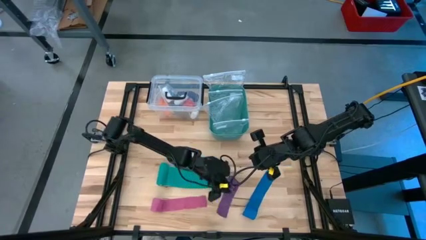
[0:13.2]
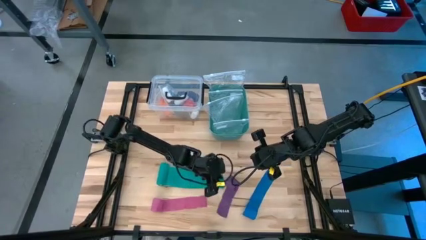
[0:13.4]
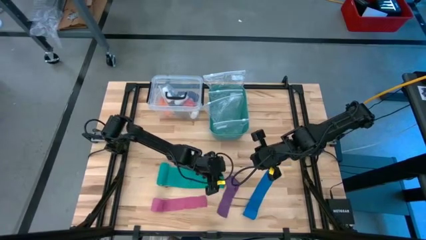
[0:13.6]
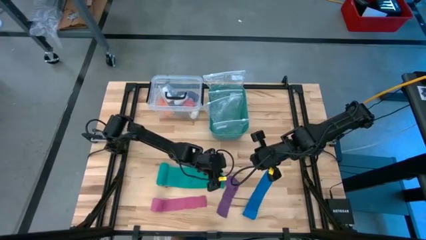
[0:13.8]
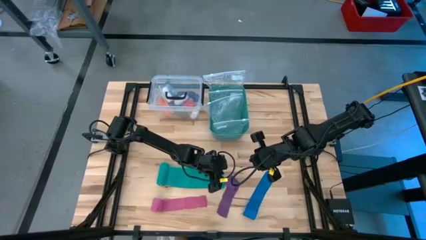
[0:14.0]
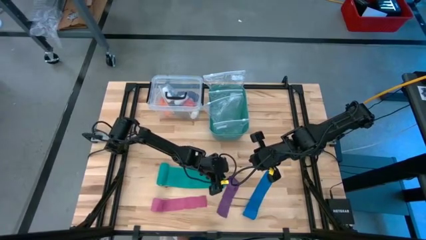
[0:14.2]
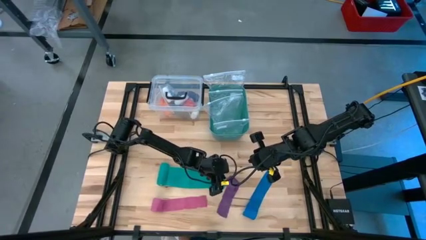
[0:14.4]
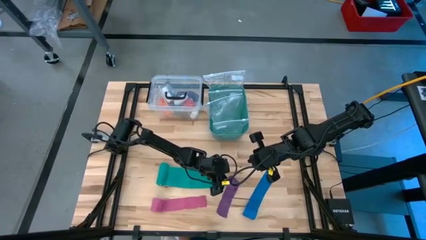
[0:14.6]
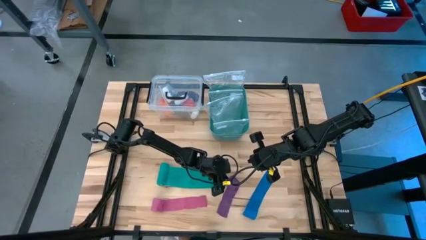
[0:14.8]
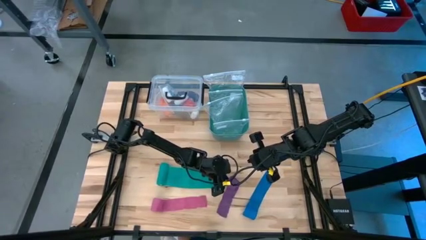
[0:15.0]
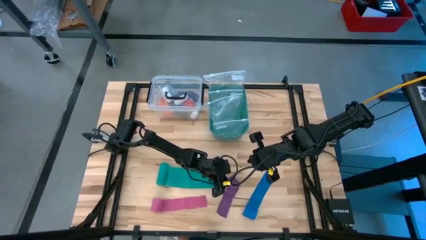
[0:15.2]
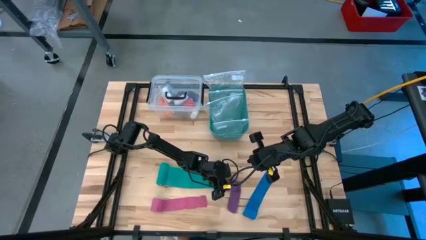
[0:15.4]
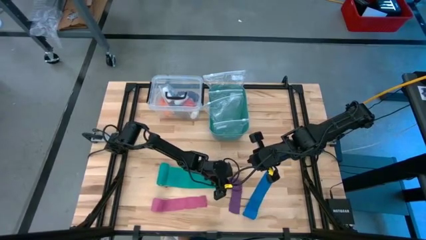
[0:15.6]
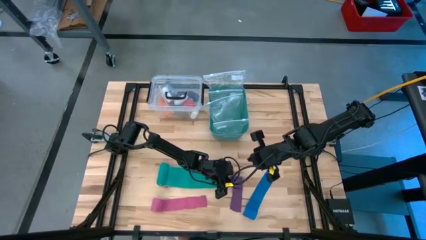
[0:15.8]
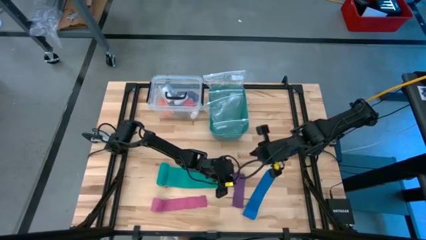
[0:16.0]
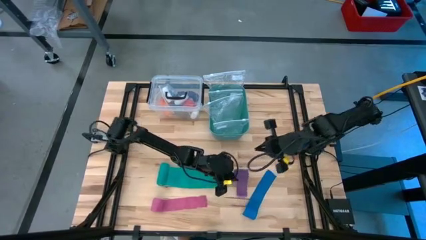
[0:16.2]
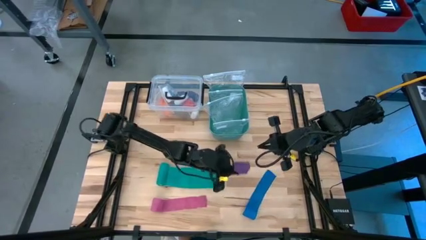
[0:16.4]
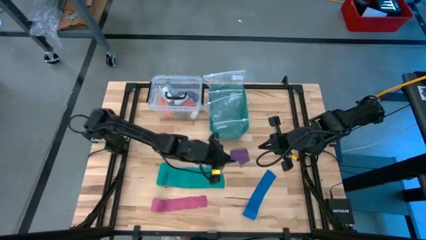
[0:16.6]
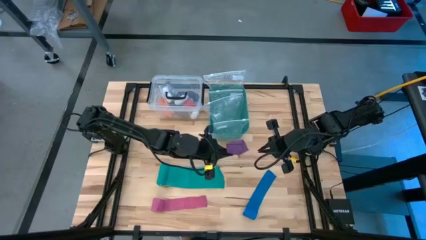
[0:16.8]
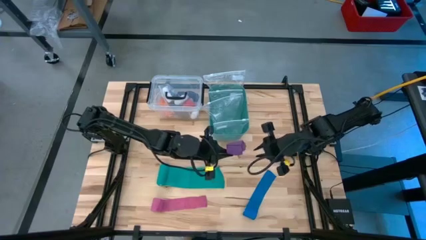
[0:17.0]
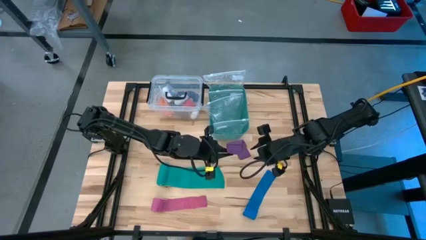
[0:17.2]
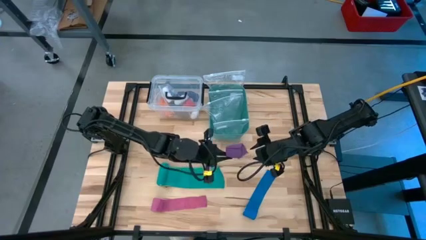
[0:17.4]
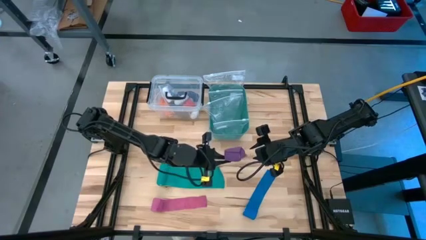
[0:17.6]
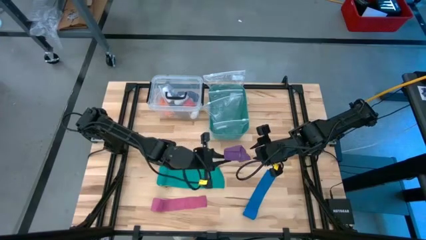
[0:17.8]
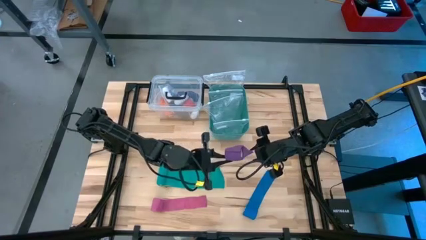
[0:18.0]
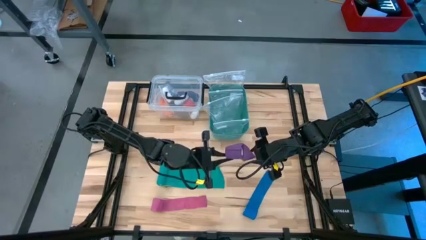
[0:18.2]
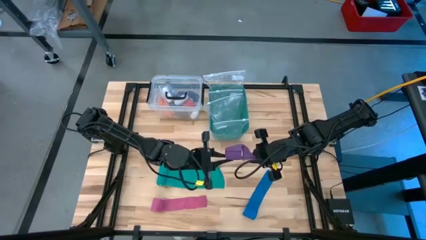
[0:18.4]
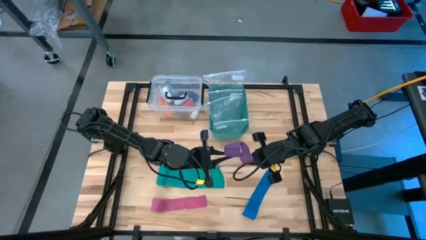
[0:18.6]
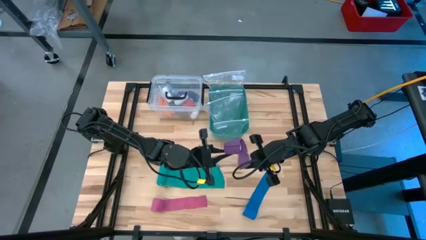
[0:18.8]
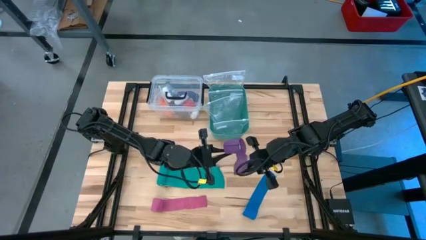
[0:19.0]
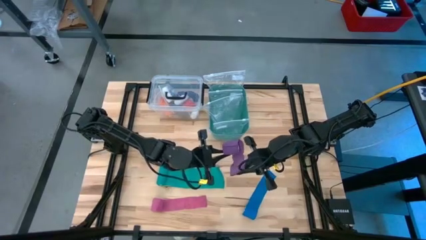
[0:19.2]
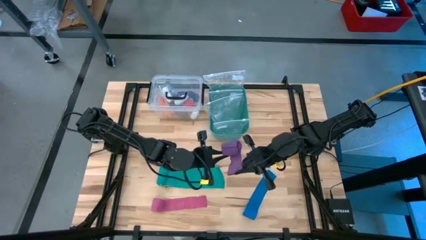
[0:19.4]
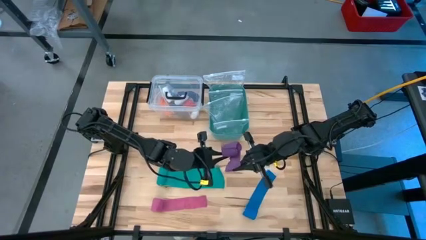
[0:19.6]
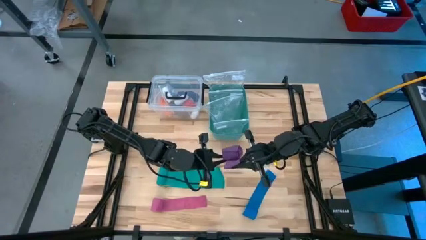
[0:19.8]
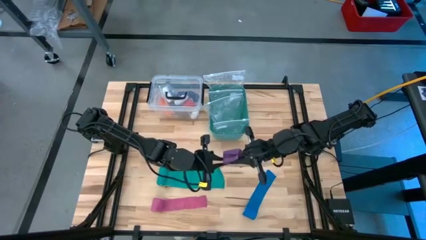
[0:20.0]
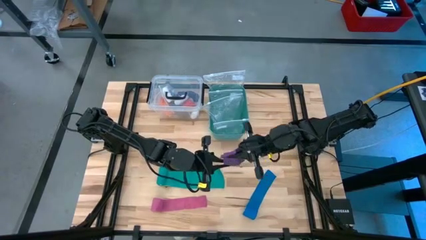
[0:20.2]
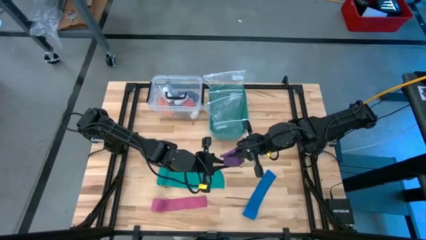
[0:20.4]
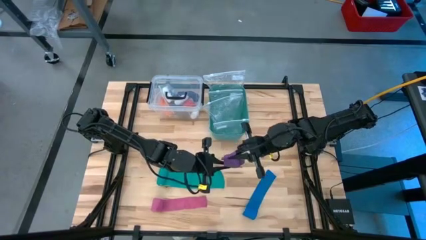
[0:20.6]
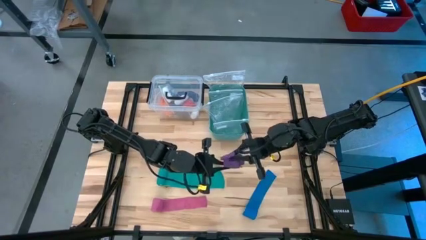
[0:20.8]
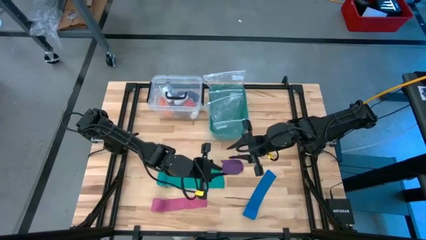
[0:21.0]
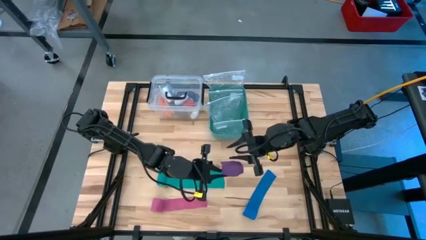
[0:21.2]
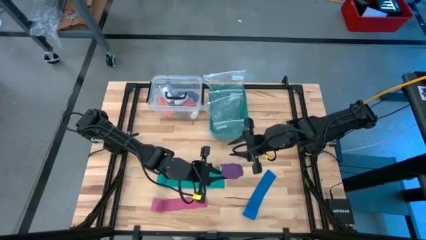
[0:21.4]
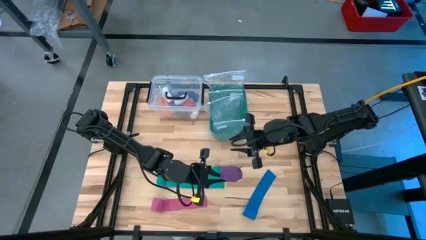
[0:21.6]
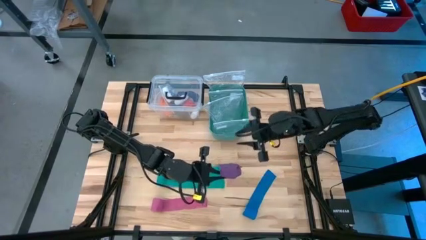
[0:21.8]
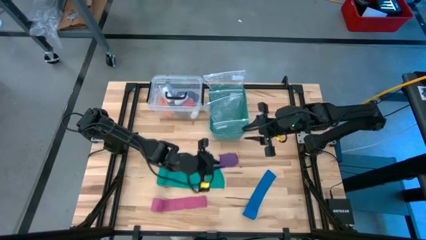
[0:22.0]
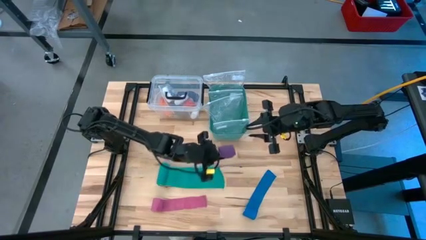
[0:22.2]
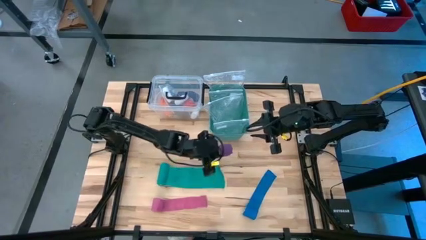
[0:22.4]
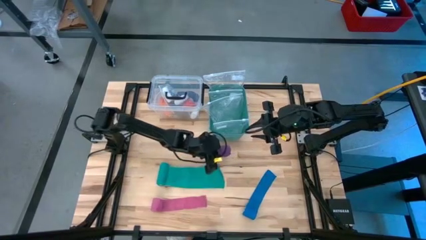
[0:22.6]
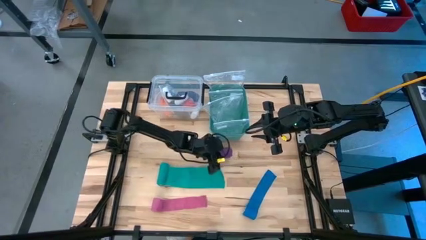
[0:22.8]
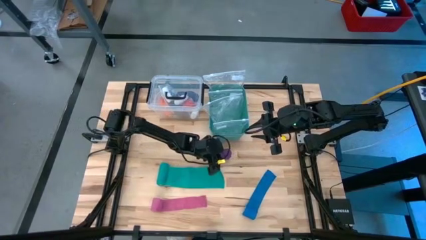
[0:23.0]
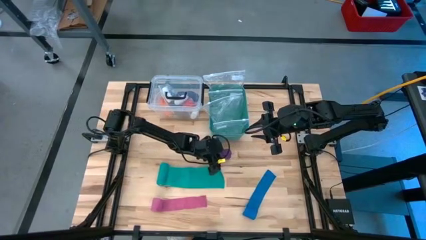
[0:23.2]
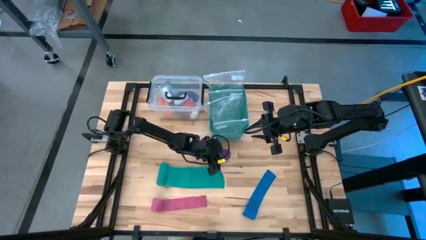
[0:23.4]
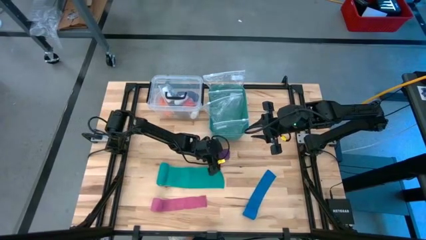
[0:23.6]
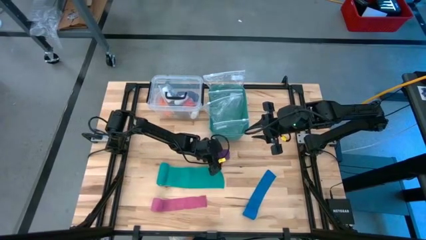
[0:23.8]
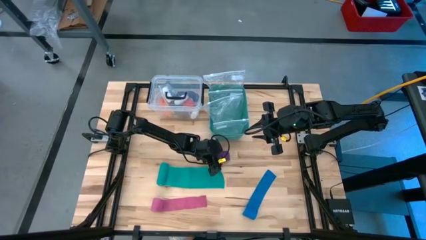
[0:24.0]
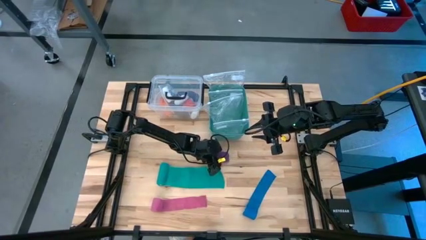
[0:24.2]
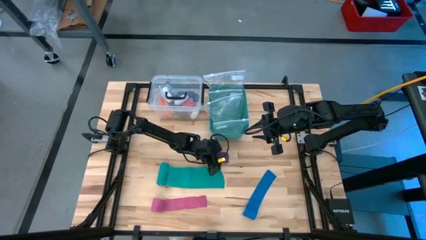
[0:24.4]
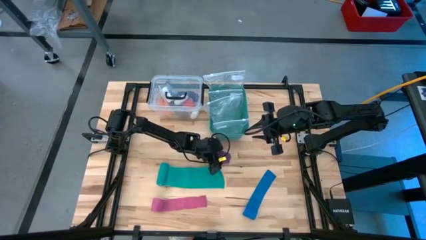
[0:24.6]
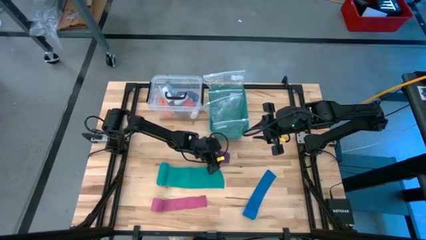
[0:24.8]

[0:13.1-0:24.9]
Task: Roll bandage
Roll the purple bandage

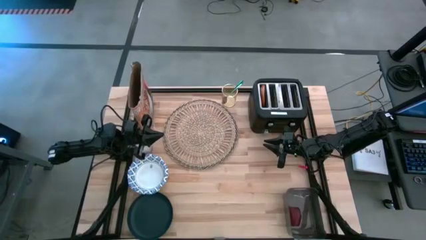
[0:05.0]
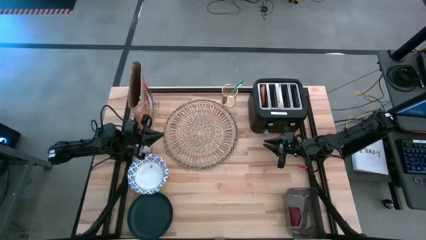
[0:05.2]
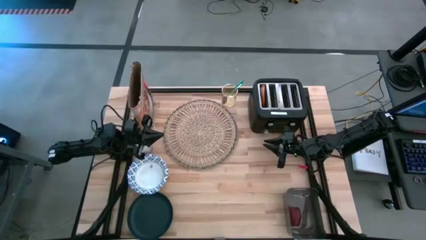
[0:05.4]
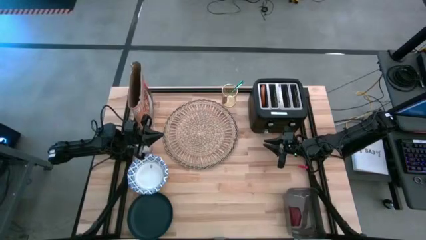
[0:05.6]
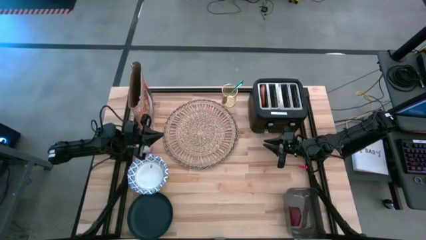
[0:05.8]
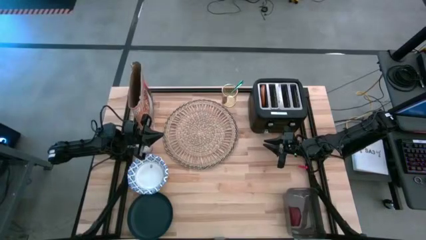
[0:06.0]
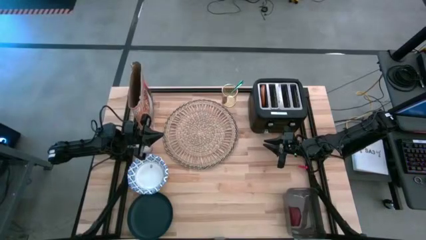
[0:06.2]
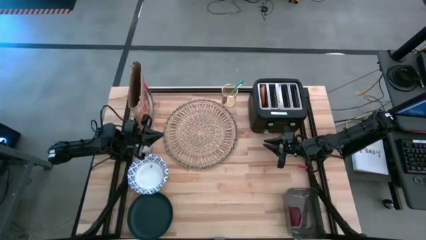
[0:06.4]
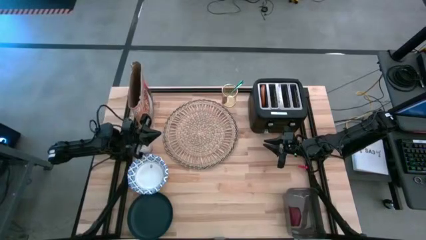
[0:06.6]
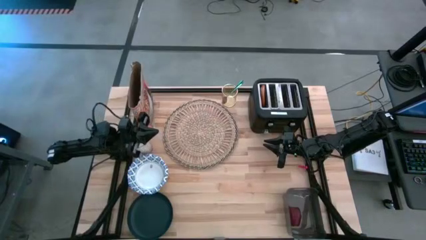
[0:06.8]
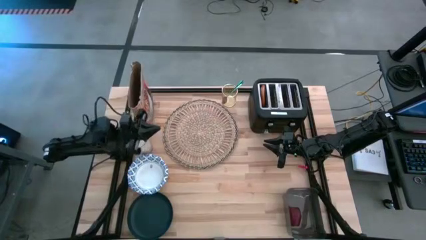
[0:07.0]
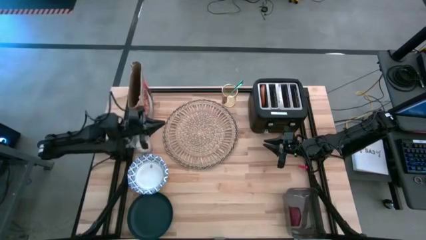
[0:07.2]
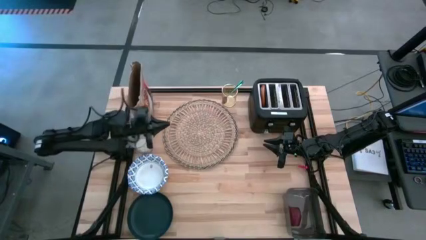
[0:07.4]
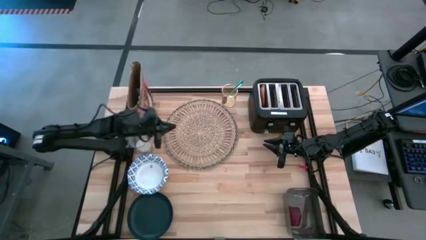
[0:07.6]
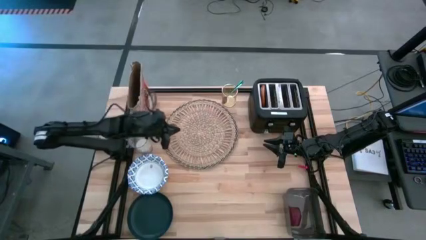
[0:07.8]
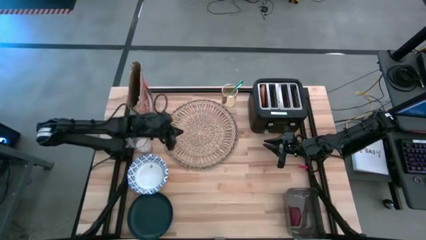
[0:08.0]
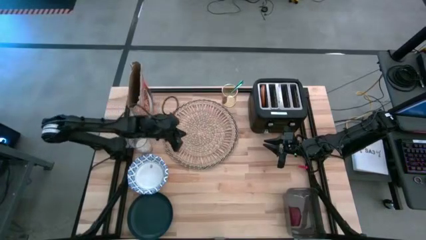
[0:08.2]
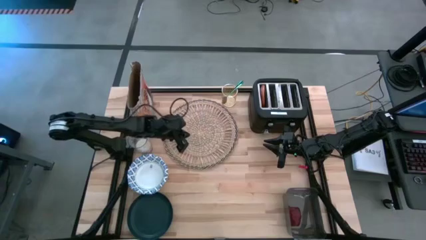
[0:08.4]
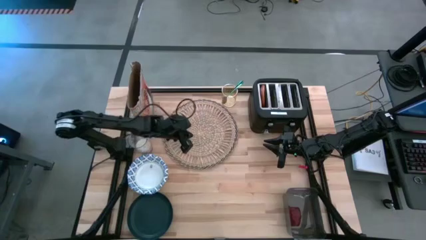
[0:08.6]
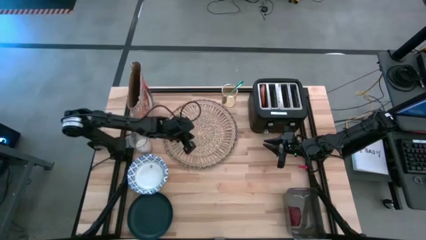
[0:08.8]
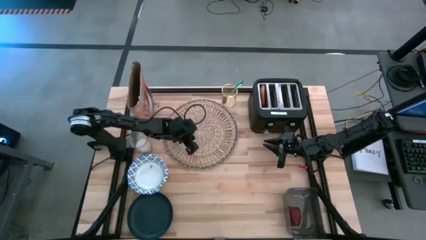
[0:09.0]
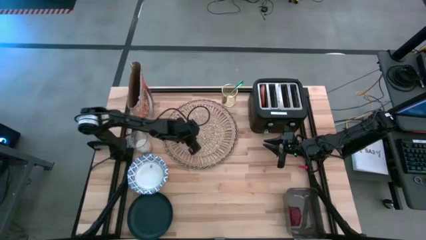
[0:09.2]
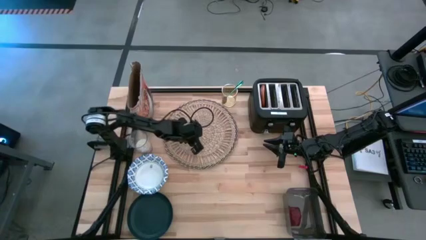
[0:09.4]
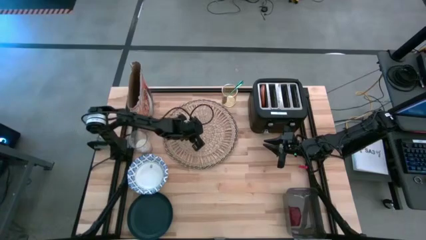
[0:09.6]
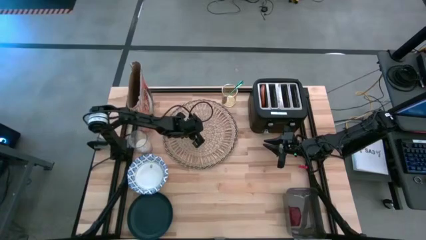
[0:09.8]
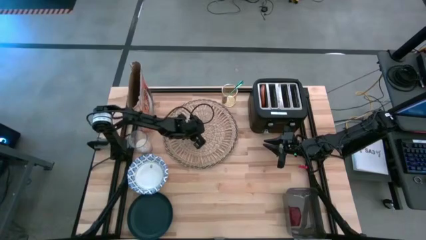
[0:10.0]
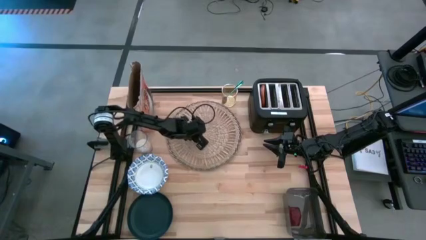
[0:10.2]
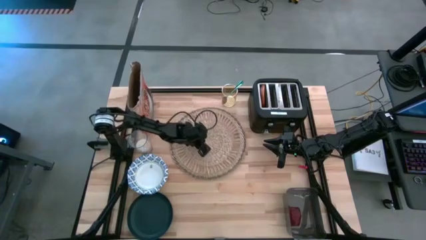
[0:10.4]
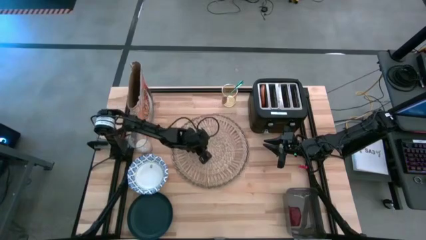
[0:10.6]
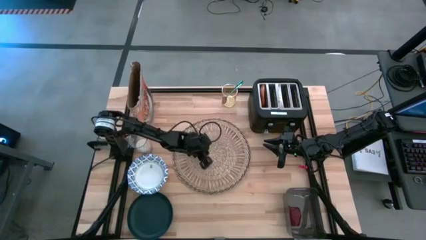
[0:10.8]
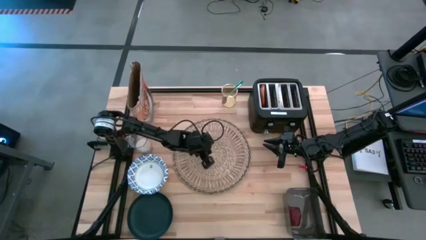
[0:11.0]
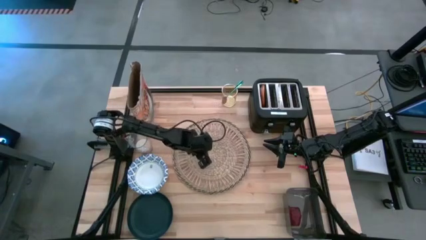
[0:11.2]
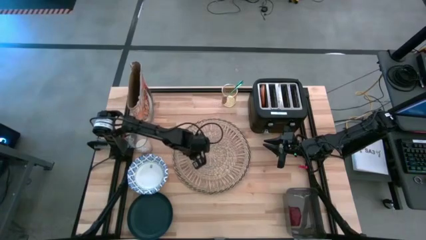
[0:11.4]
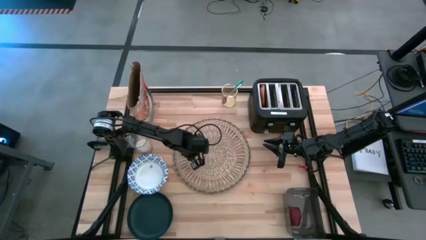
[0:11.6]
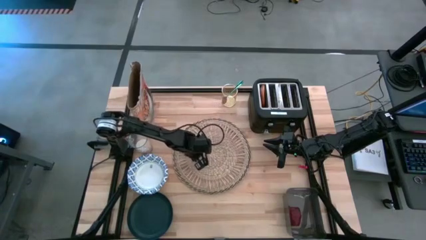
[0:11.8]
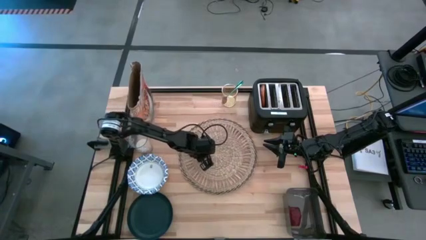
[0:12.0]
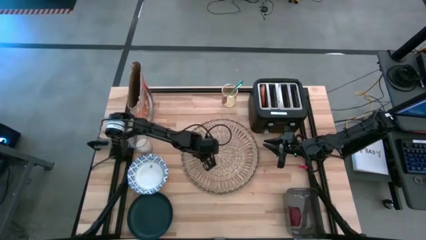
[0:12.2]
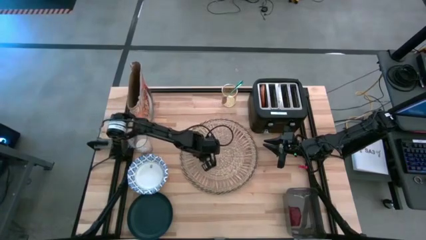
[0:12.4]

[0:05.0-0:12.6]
Task: Arrange a breakfast setting
Move the brown placemat to the center of the table
